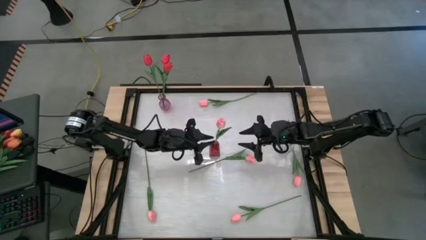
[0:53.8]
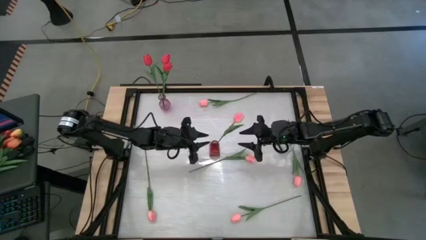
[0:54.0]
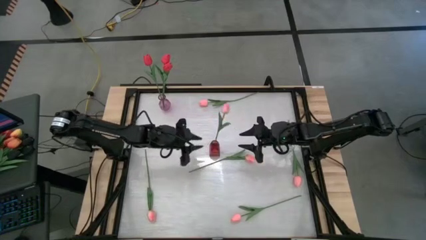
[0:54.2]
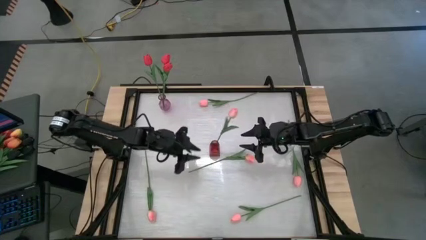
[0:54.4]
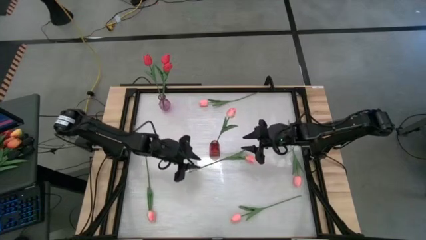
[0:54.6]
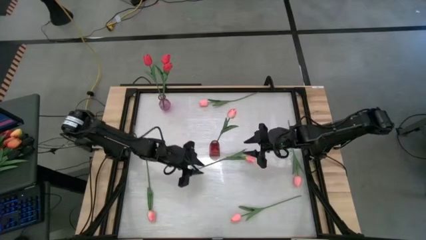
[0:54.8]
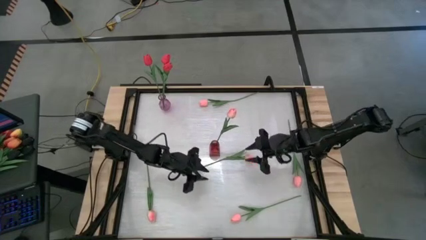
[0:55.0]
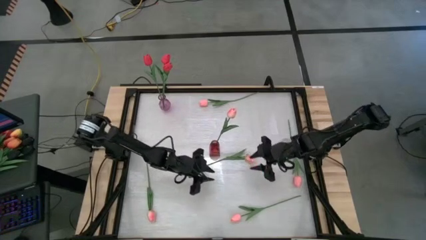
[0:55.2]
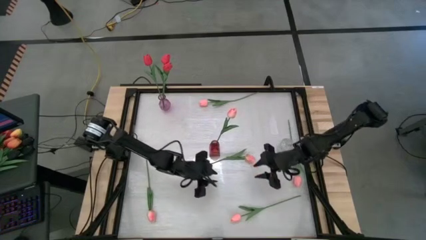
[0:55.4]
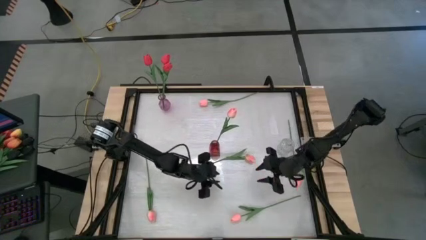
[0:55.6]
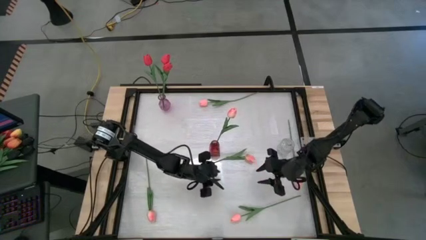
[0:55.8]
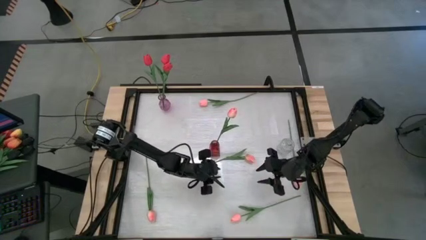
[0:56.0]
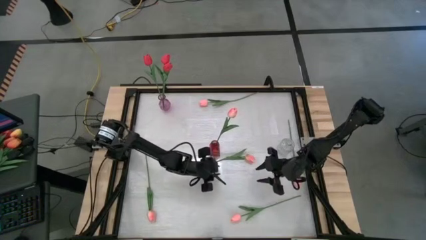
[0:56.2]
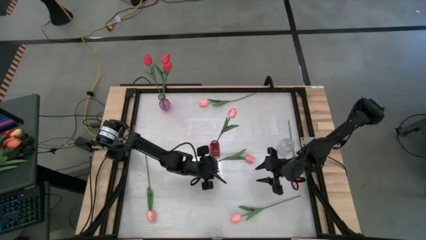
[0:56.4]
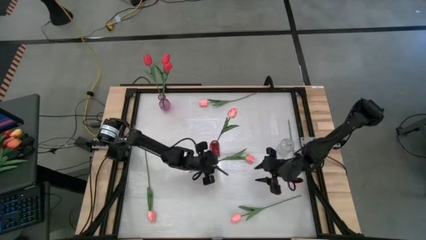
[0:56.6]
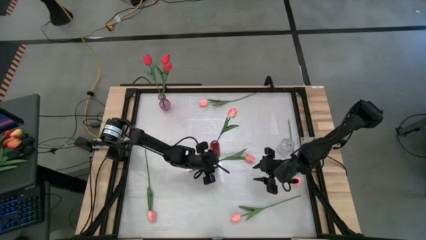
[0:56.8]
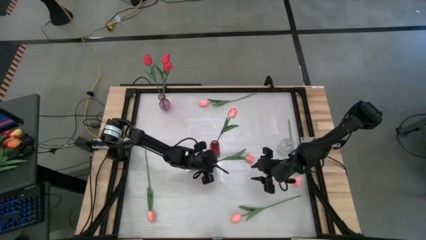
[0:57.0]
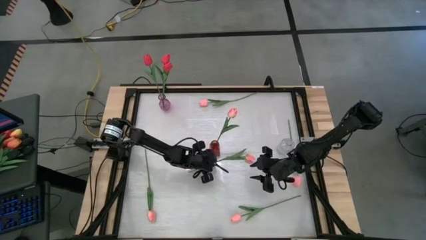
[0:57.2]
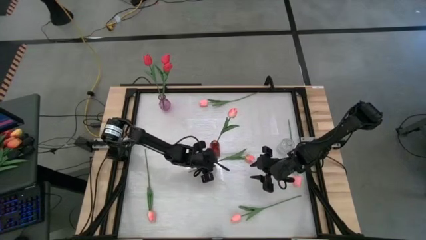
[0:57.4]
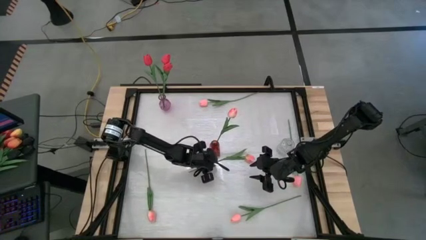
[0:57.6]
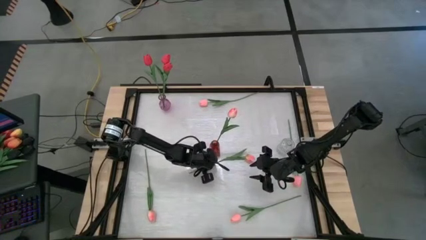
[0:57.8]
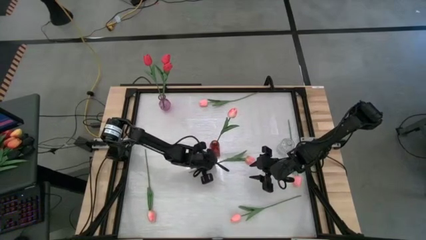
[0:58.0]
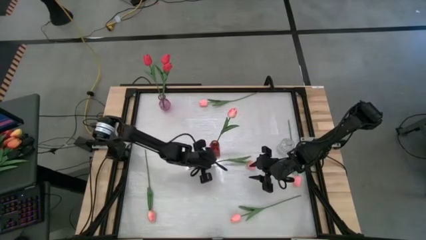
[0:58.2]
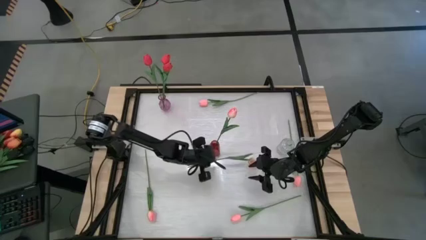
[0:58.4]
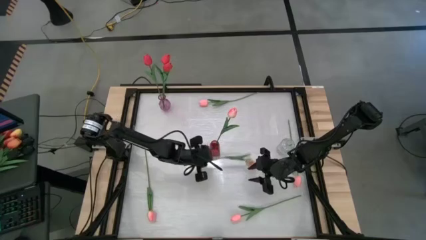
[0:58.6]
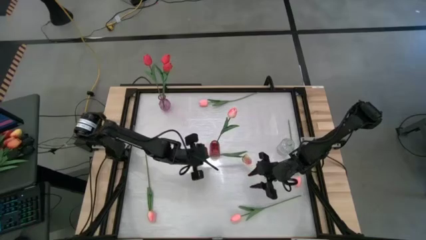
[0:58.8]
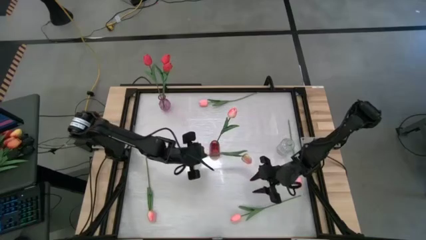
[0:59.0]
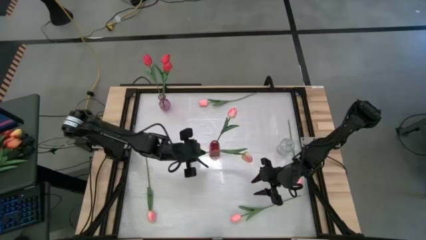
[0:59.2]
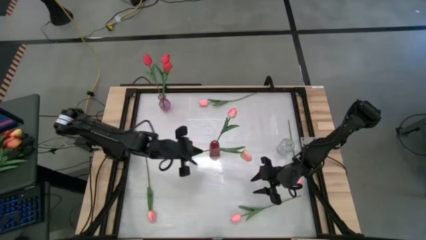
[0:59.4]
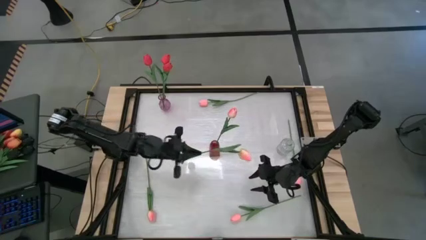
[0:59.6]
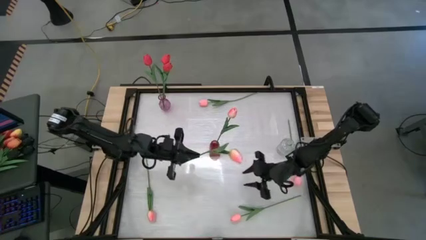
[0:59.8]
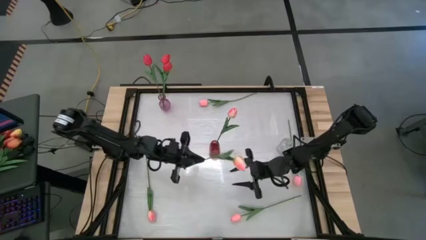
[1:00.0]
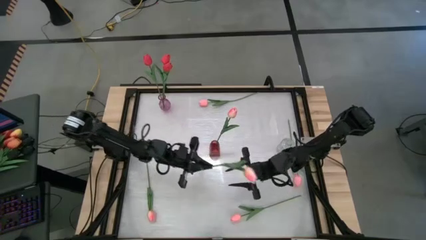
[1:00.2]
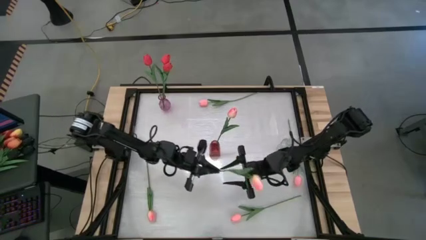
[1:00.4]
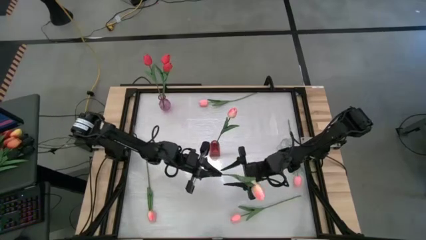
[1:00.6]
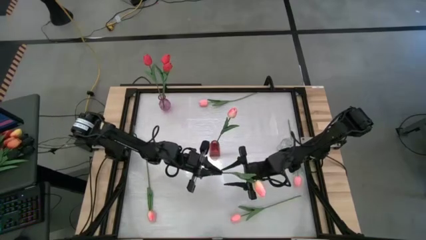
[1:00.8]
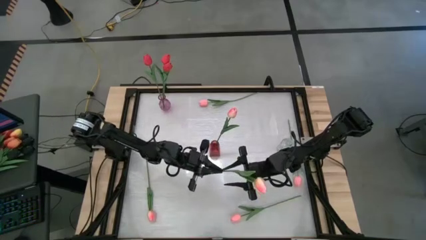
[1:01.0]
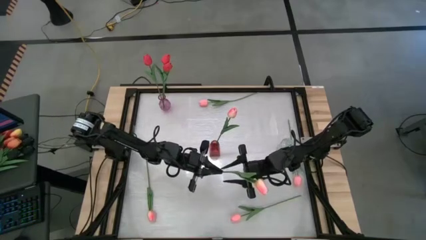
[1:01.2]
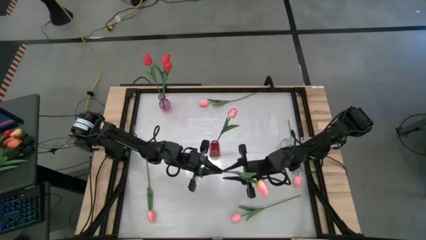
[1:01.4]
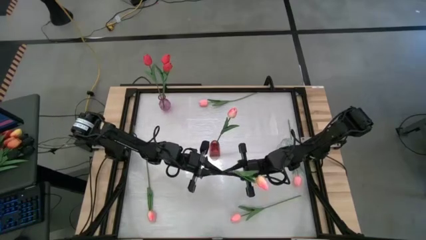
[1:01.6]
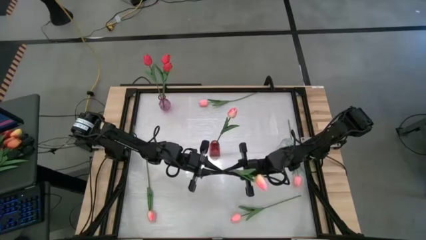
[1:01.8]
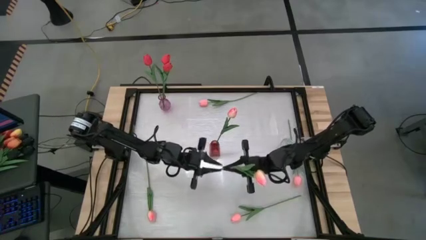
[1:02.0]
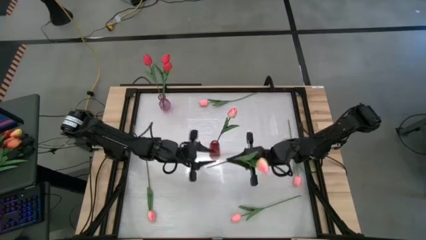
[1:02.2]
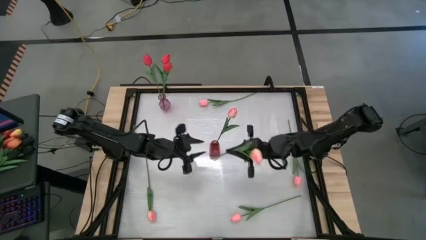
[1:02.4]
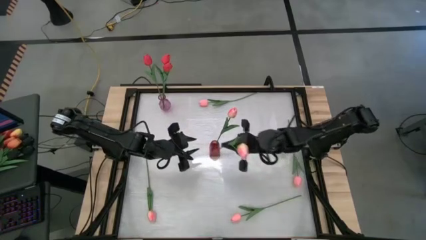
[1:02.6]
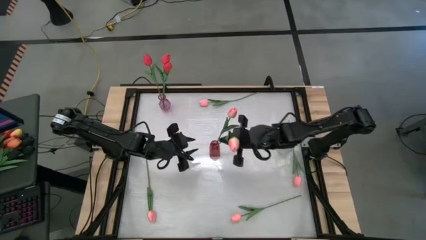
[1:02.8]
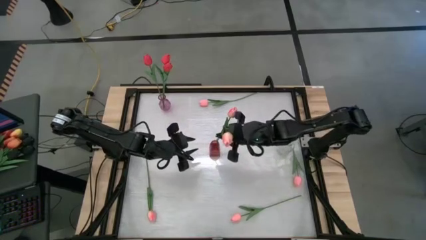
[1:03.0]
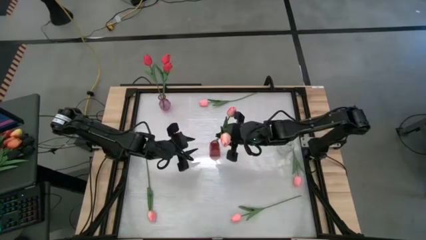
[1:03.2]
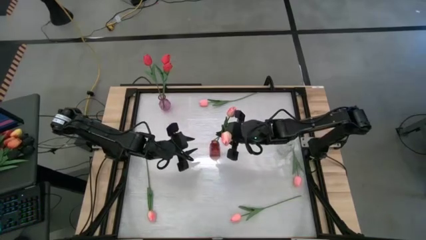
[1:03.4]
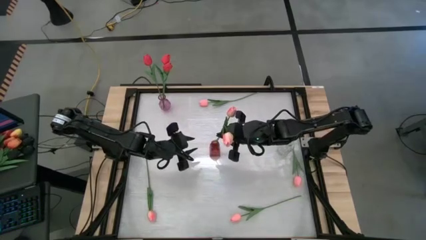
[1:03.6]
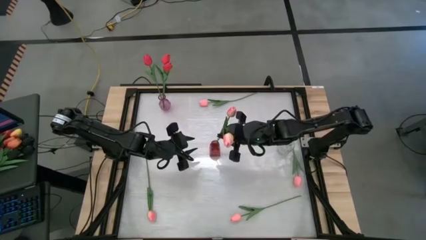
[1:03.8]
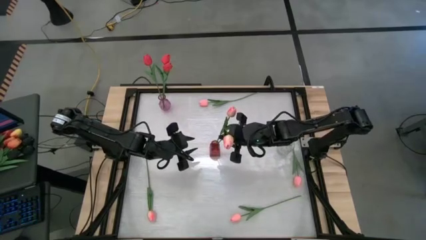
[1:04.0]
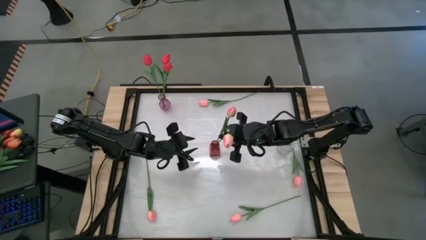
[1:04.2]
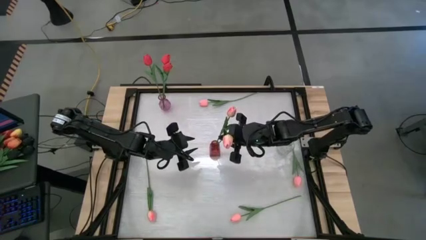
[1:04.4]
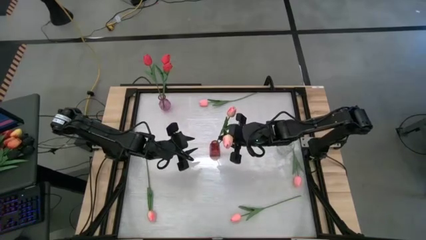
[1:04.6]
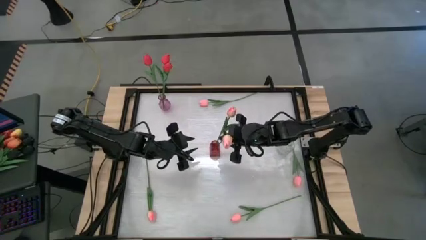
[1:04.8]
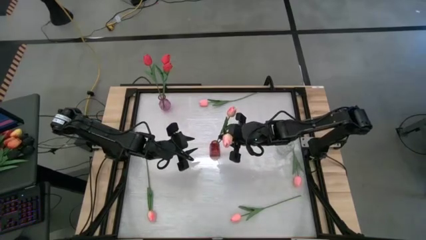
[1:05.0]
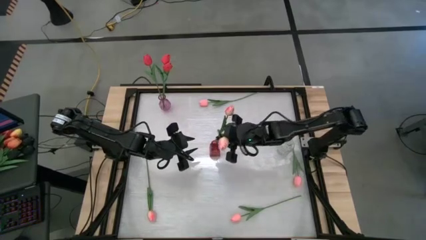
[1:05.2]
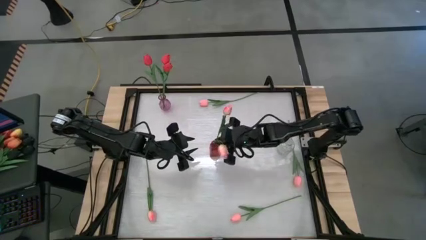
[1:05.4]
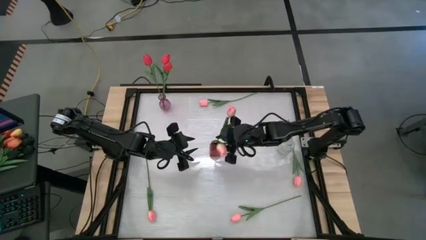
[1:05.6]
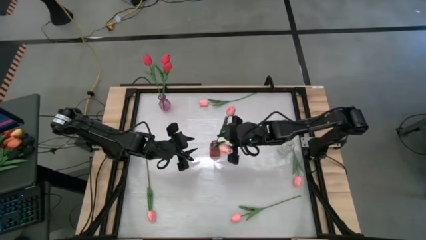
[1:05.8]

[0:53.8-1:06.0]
Task: Sort flowers into vase by color
Put the top pink-orange tulip into the red vase
